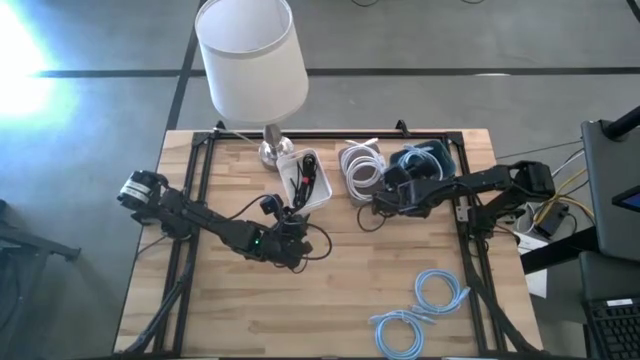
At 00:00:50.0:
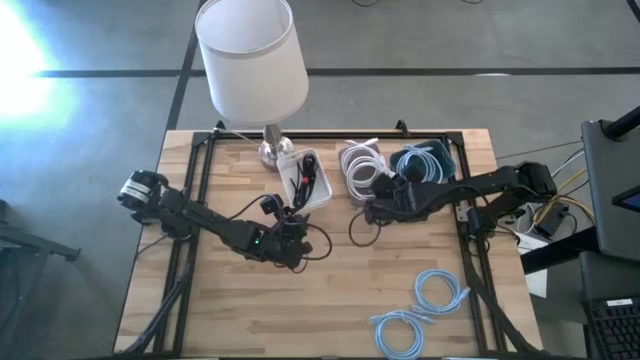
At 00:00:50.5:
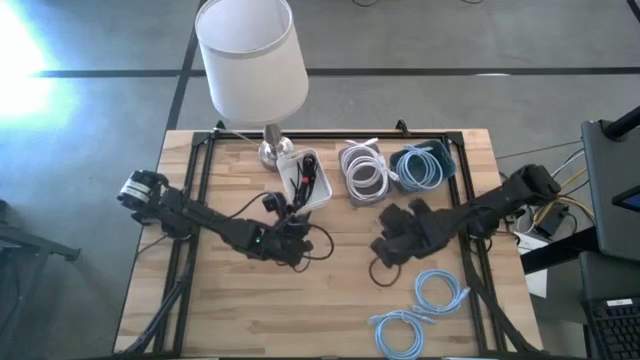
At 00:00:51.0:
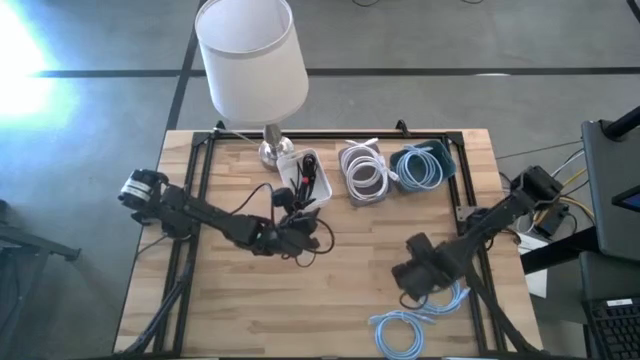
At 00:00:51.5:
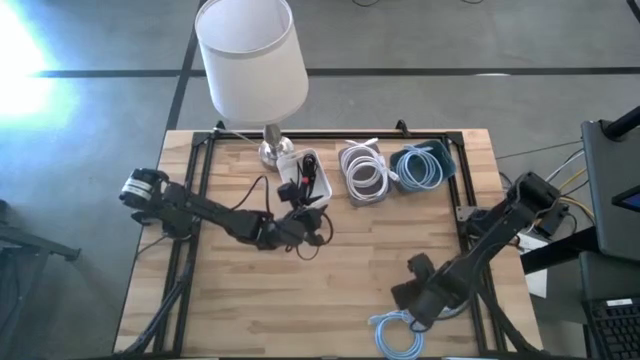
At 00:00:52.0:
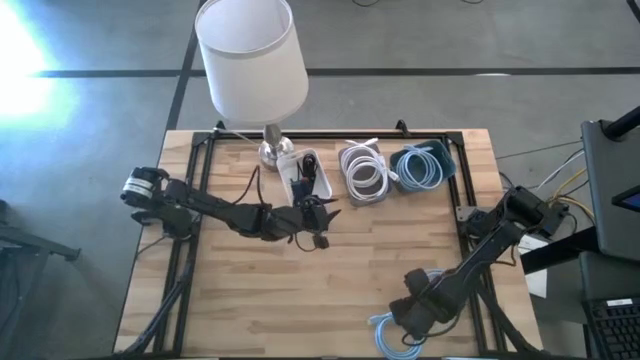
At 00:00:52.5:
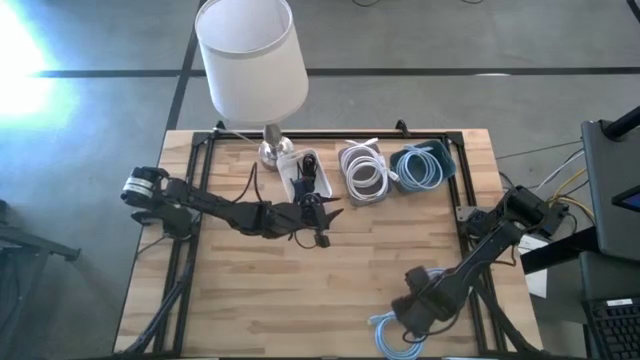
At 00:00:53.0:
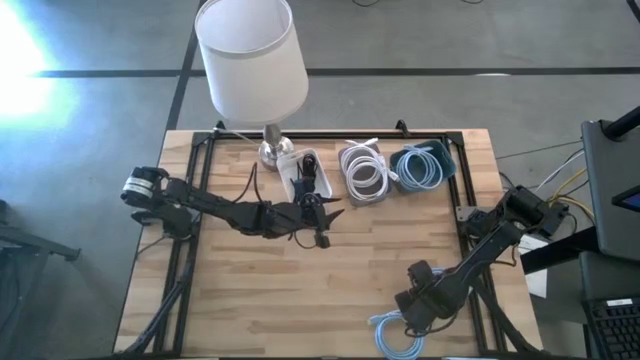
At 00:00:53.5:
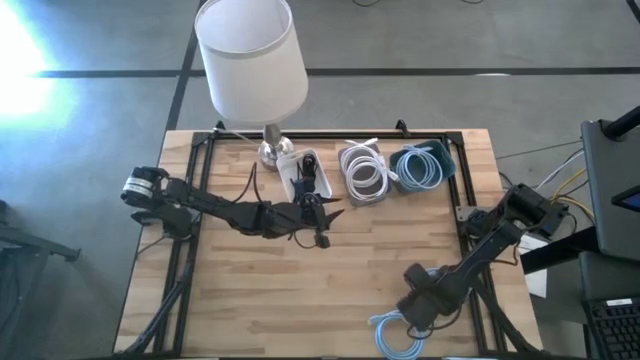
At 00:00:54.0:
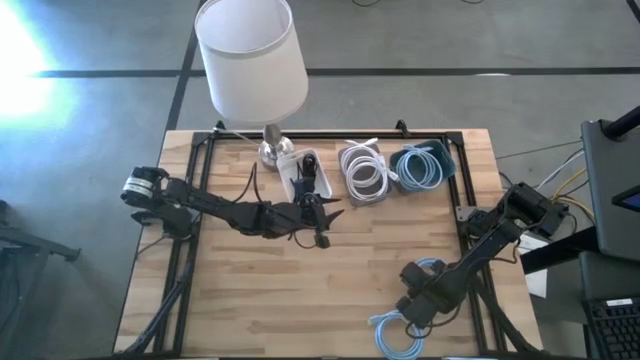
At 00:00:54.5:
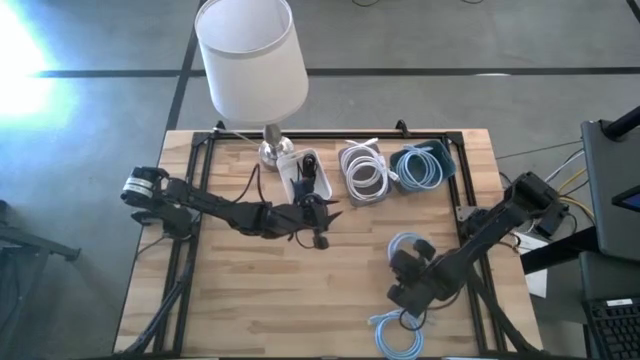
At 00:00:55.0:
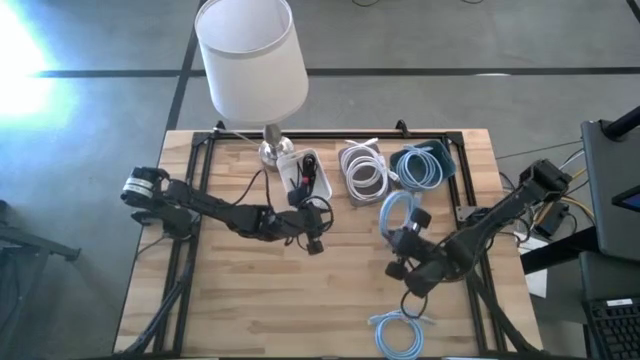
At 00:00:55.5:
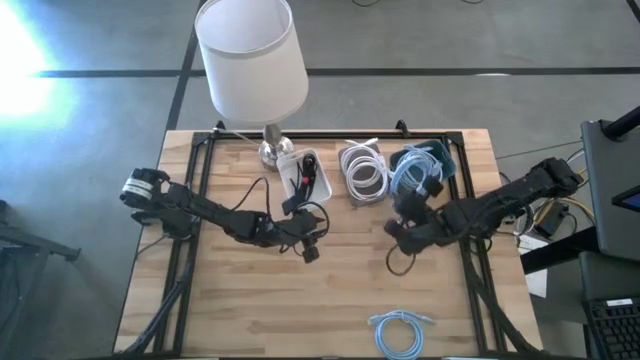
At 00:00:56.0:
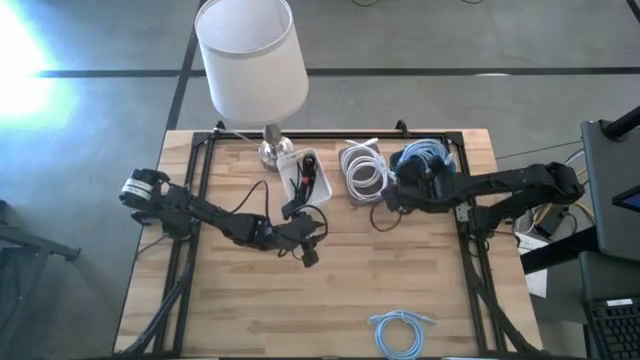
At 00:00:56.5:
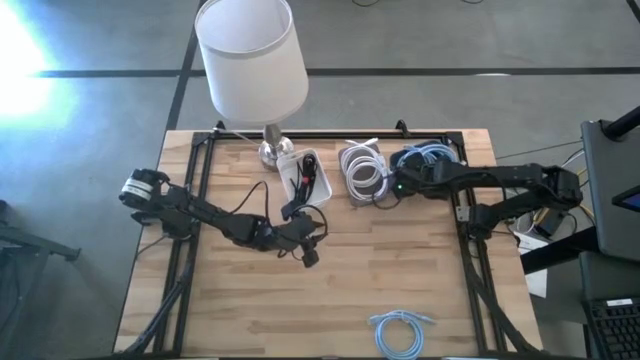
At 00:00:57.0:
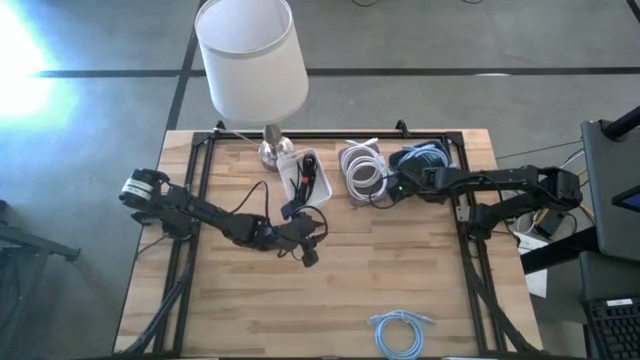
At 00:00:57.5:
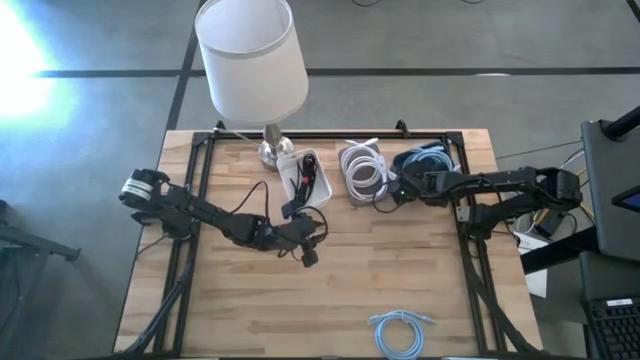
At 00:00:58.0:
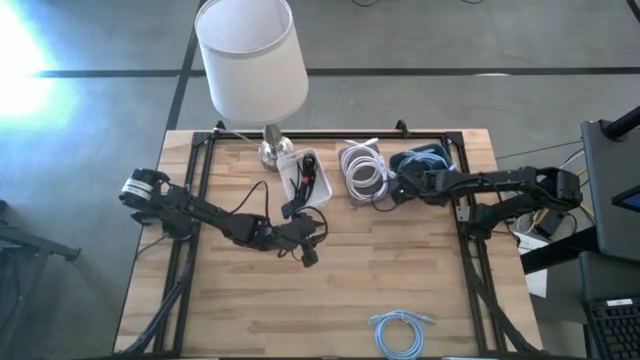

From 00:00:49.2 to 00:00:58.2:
Task: Pick & Place USB Port
Put the right blue HDMI cable into the green bin

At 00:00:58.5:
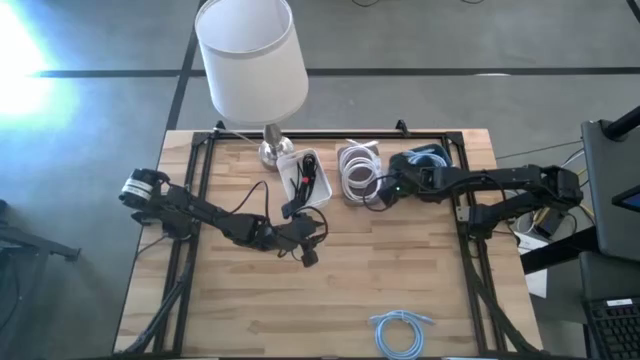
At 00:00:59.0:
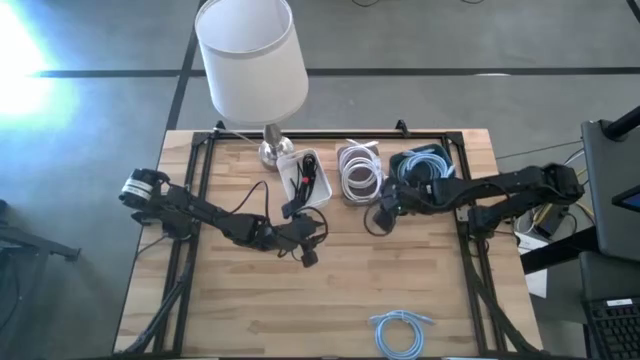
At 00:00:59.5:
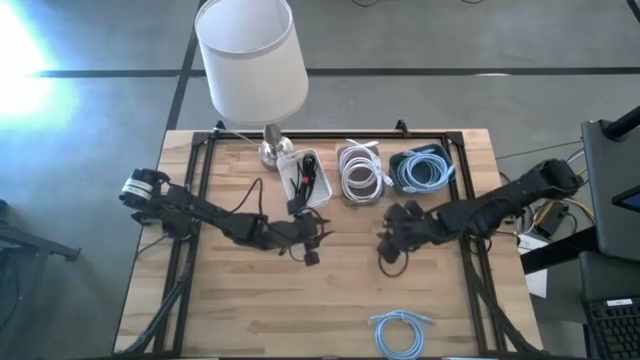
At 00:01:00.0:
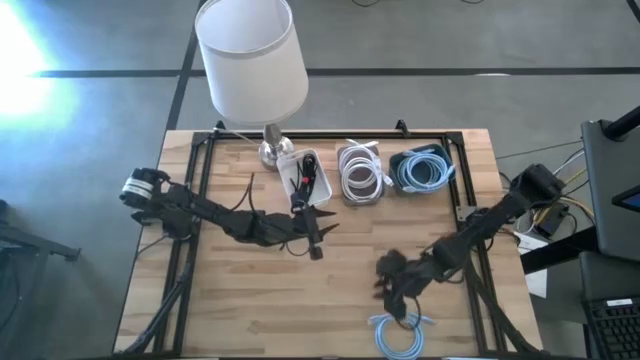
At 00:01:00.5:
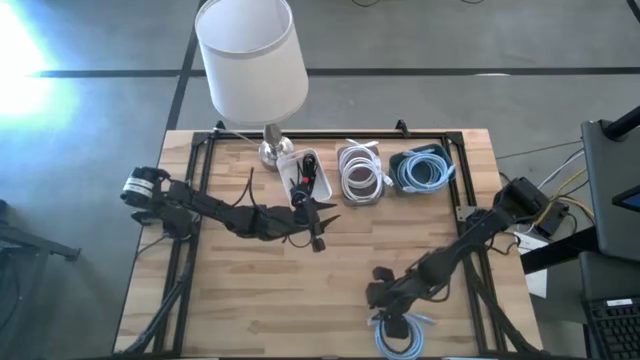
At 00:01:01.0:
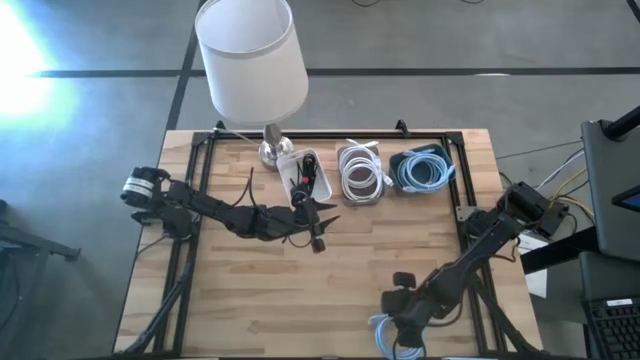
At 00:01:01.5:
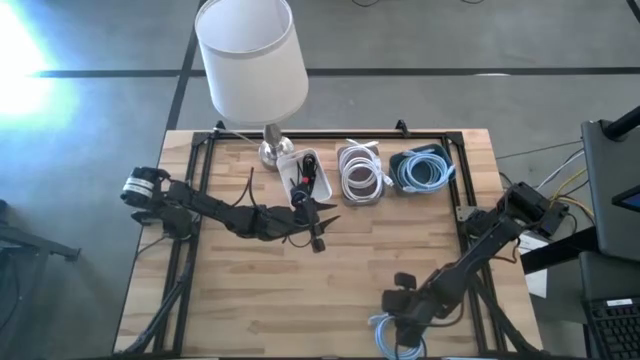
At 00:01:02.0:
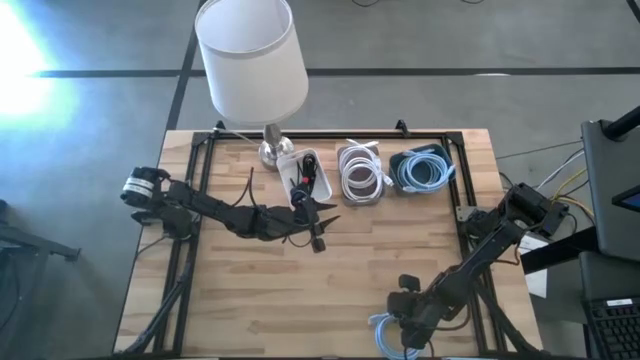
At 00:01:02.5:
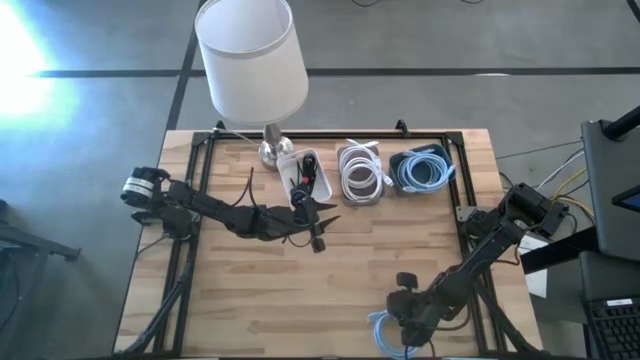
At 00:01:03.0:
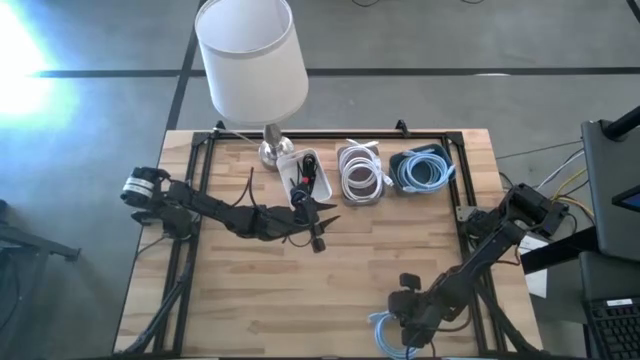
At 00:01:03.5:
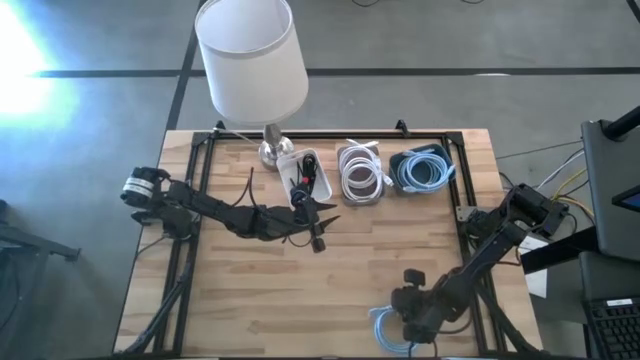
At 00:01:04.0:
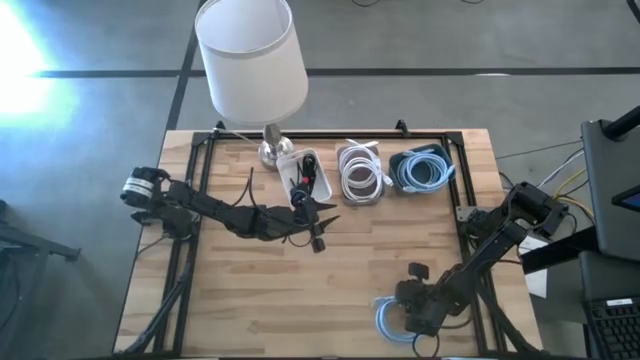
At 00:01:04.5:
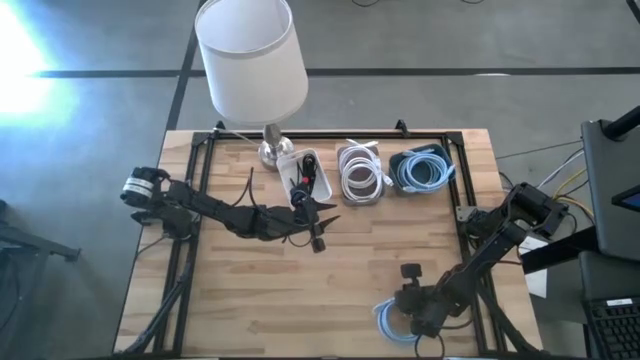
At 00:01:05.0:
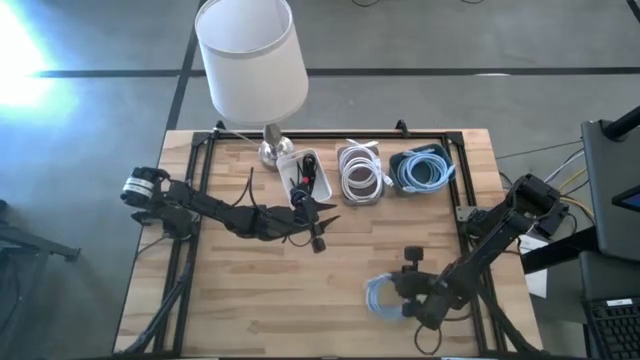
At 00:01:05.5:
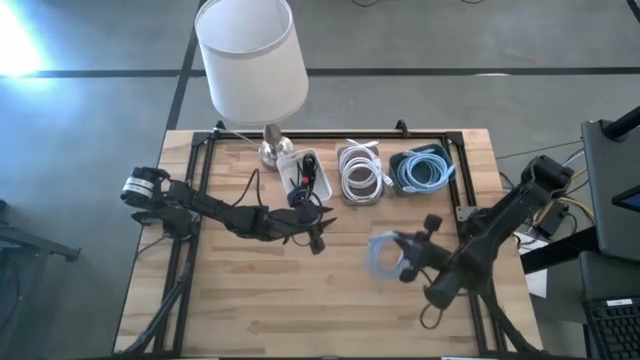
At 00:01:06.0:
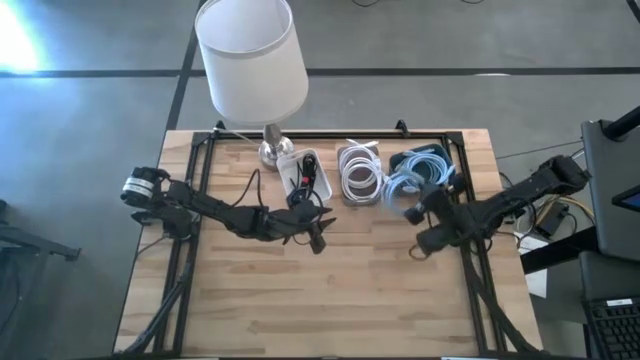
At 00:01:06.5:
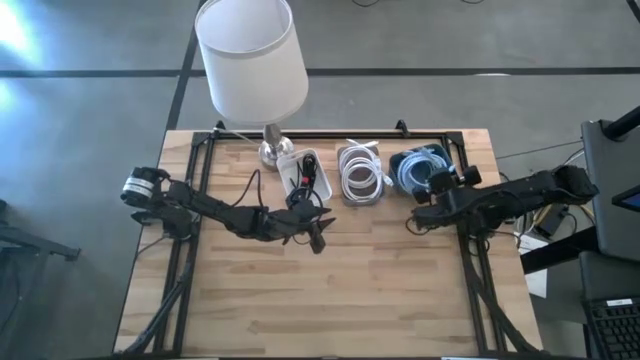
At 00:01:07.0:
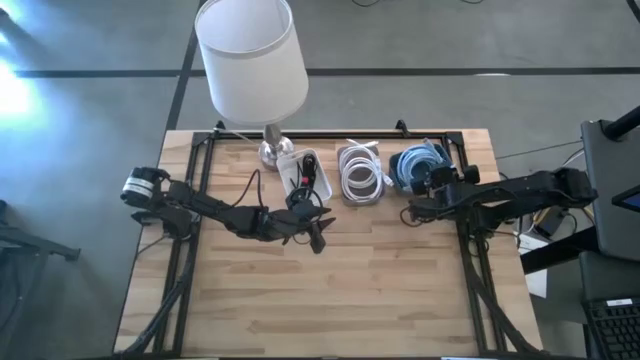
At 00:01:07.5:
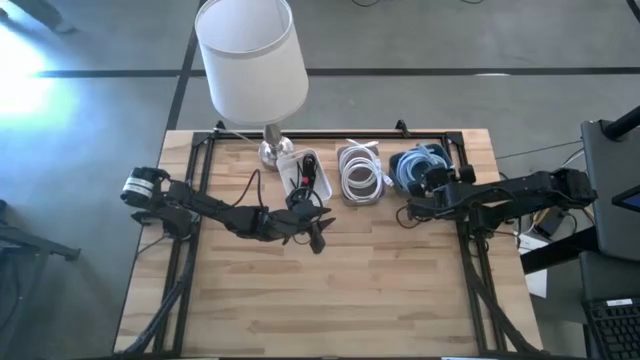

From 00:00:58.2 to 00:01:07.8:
Put the blue HDMI cable into the green bin

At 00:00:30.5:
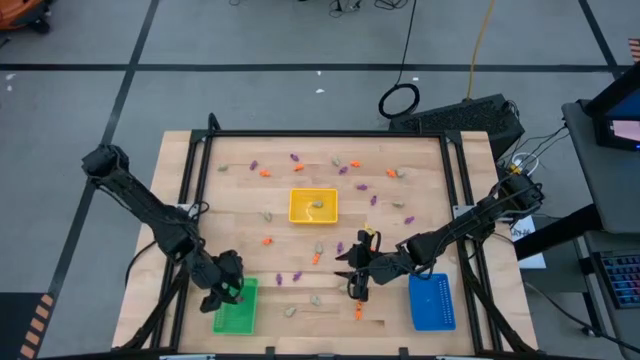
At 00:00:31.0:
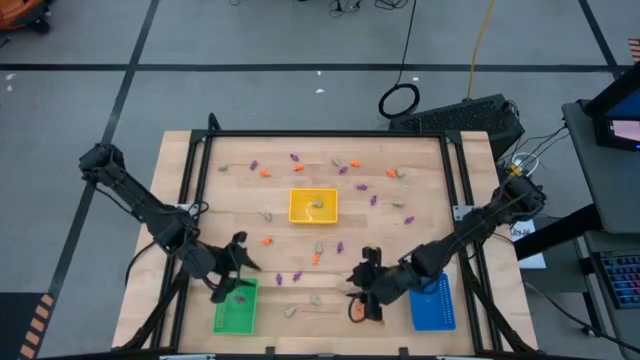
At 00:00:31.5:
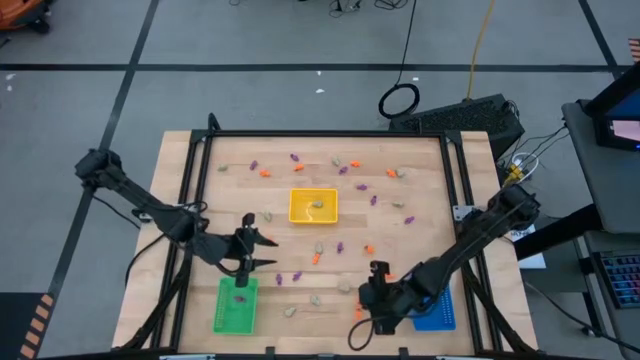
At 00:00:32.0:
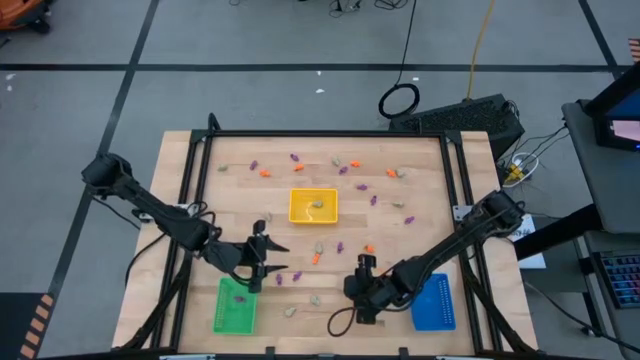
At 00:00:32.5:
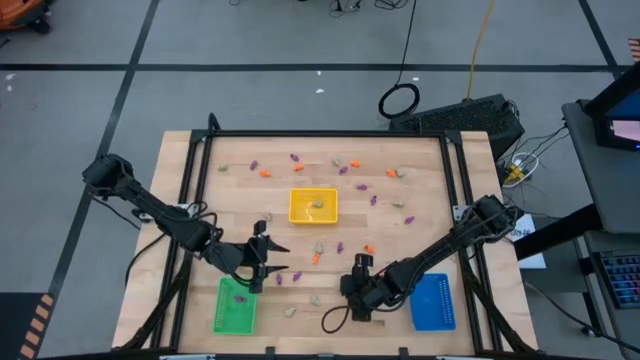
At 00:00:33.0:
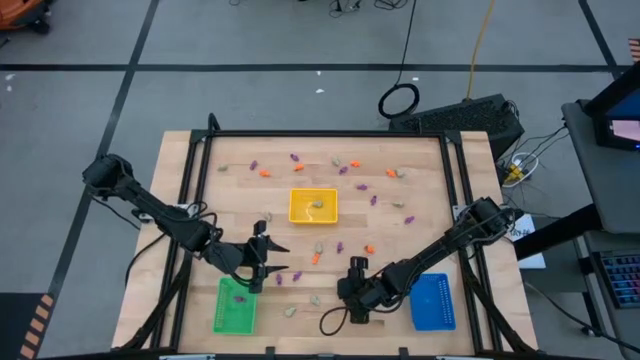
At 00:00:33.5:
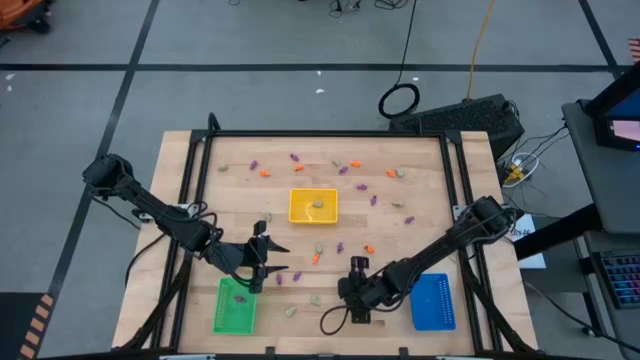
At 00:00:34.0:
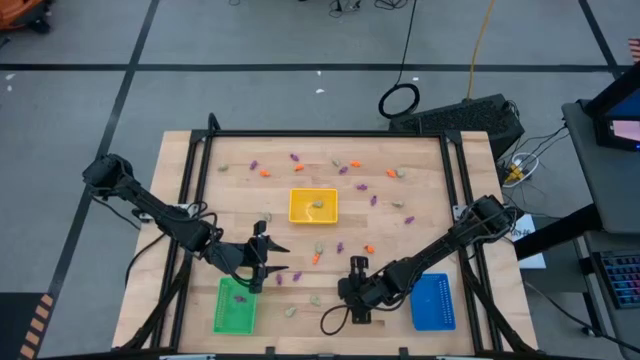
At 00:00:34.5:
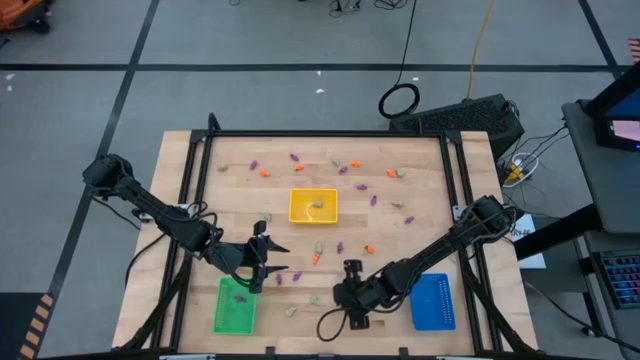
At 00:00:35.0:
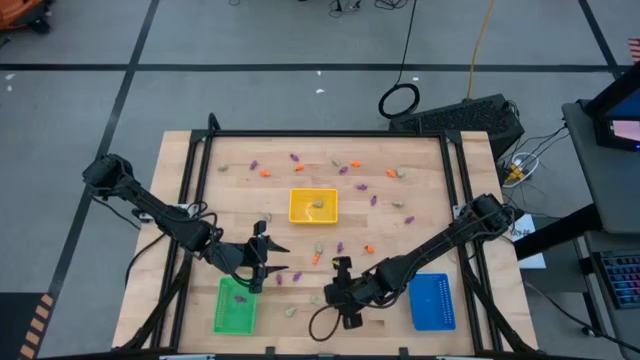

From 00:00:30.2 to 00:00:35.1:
Task: Sort Halloween decoration
Put the white skull toy in the yellow basket
